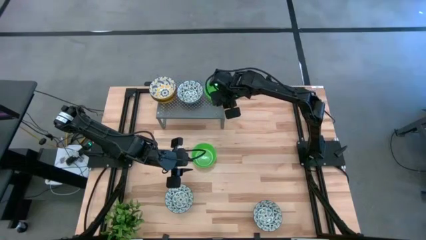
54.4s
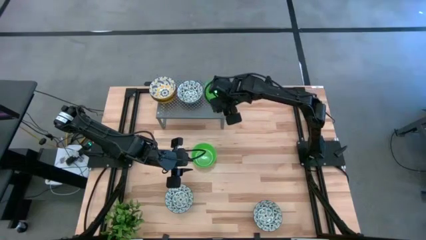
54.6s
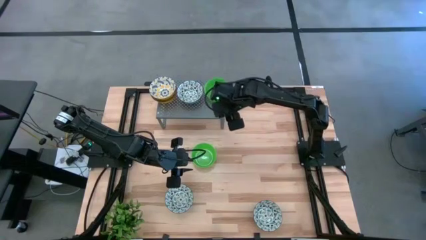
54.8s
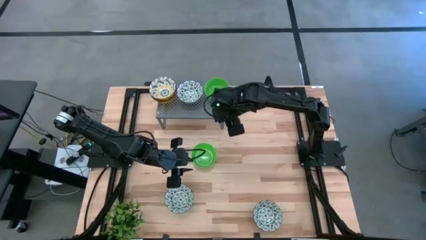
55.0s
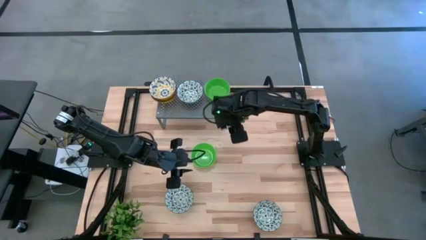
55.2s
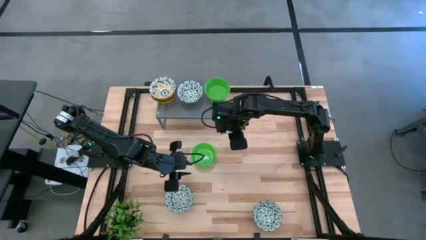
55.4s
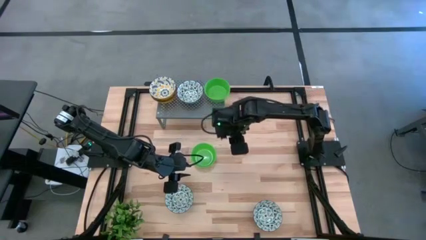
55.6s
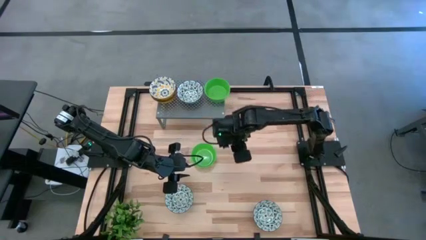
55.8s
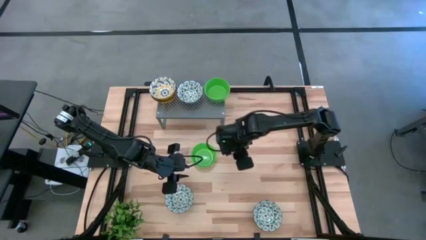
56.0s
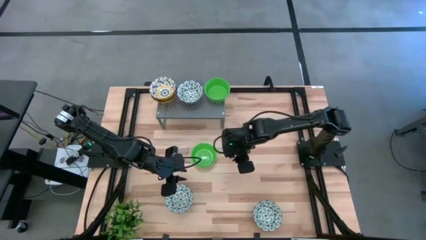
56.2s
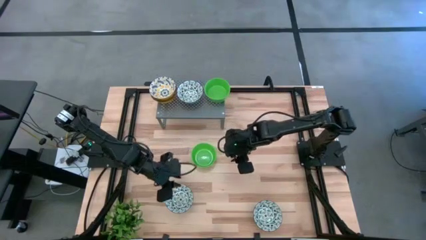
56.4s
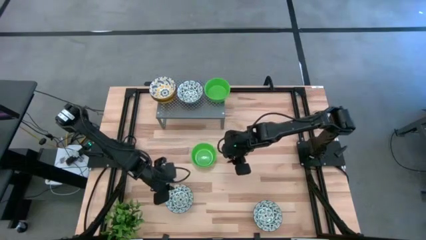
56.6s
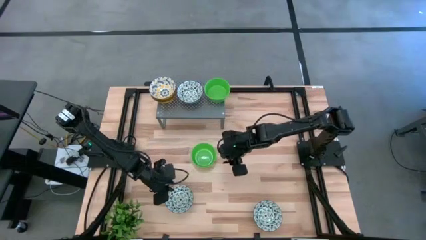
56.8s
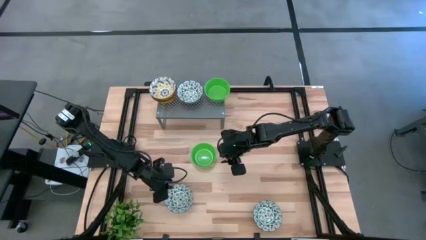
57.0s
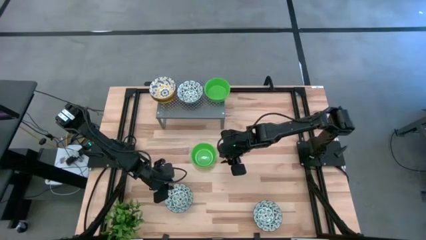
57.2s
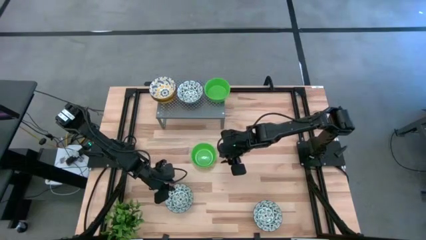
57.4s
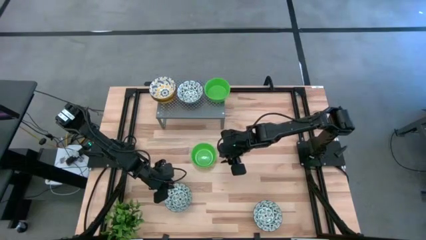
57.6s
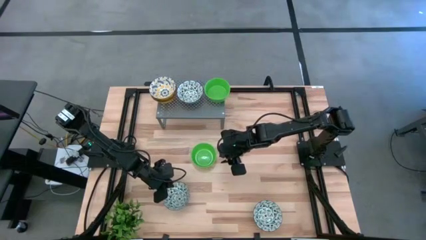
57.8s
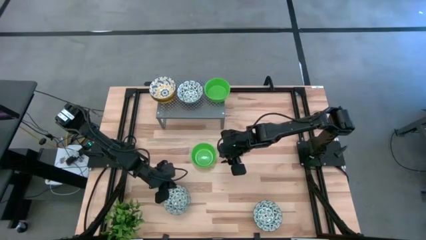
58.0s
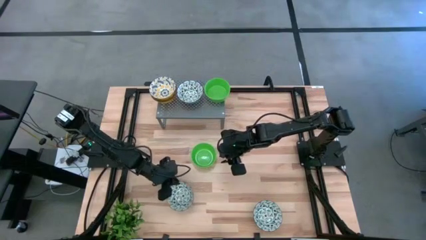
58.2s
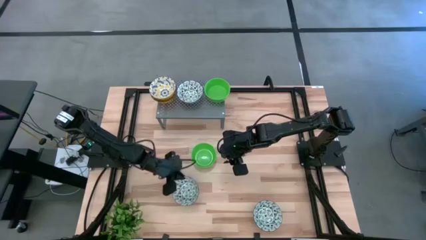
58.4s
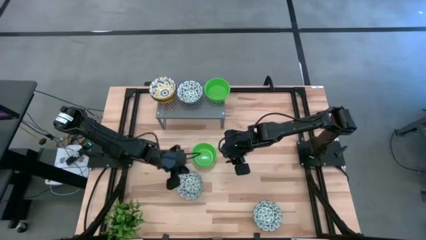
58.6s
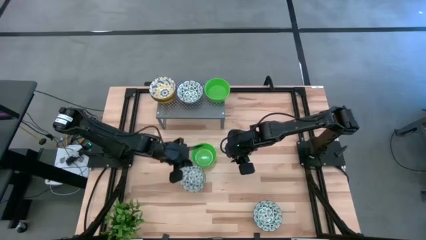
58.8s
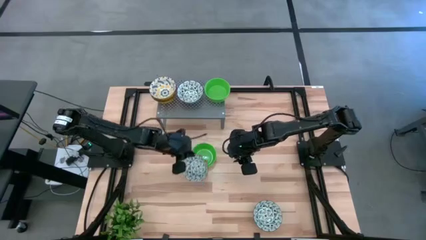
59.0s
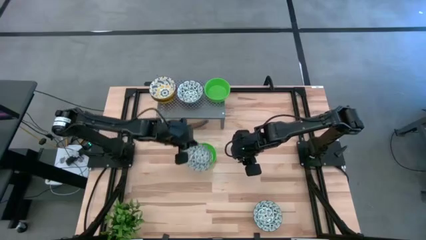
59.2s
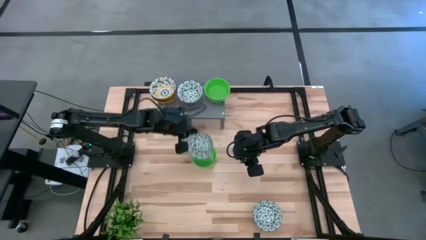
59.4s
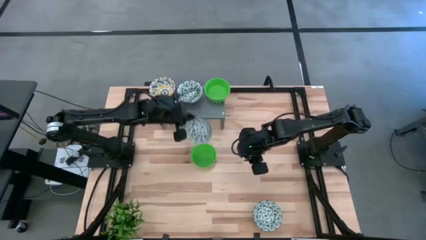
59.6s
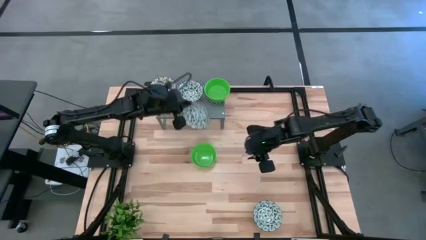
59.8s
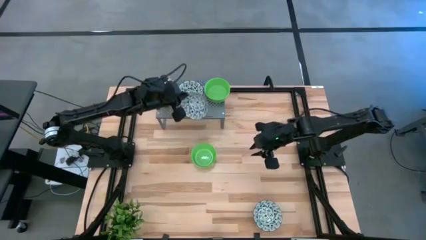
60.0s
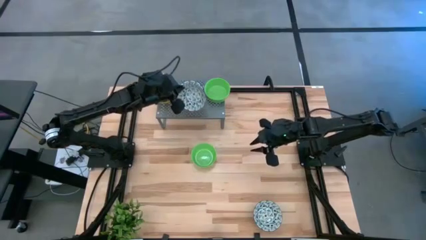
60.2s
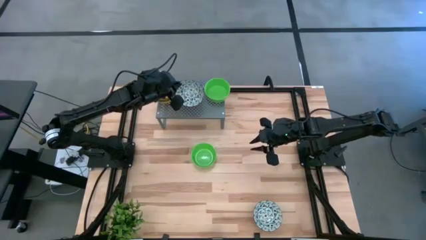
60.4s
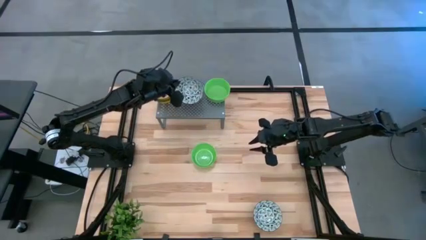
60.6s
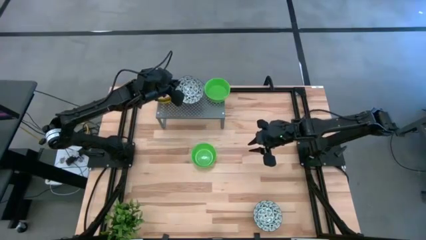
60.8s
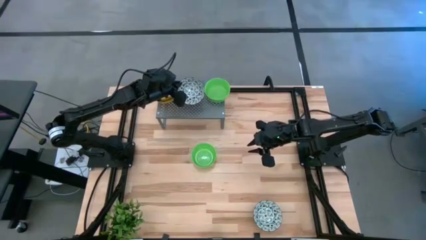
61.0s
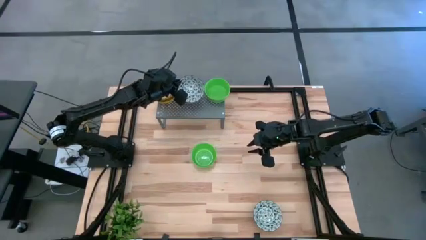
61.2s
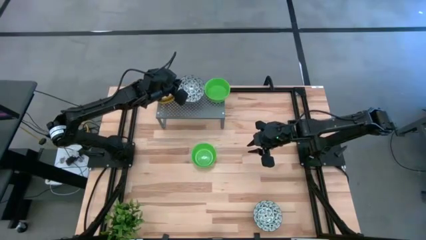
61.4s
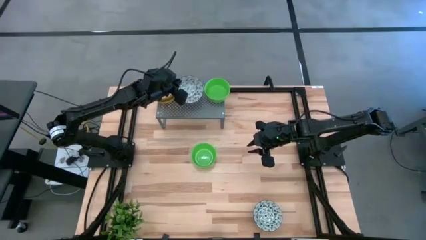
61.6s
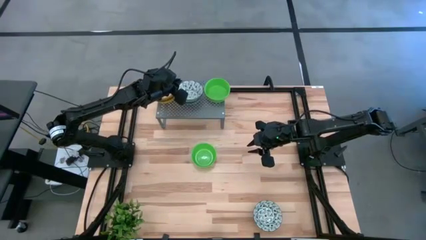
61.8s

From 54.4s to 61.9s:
Task: Pick & Place Mini bowls
Stack the left green patterned bowl on the green patterned bowl on the shelf

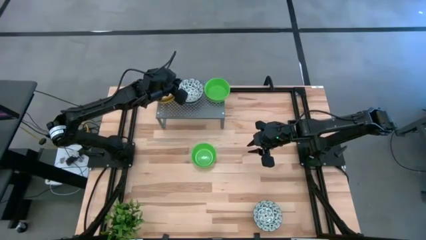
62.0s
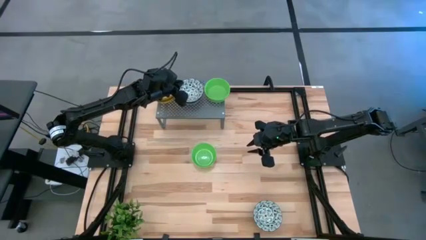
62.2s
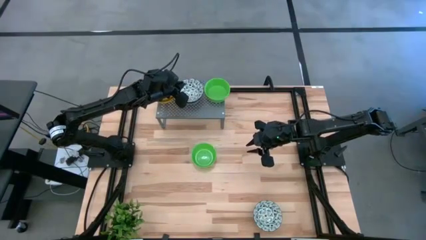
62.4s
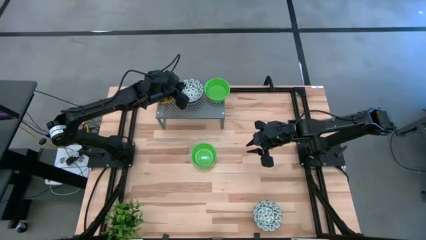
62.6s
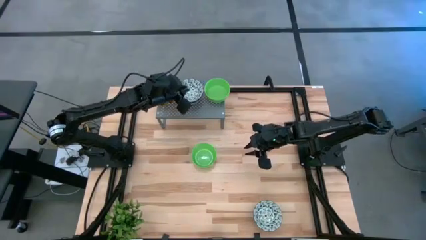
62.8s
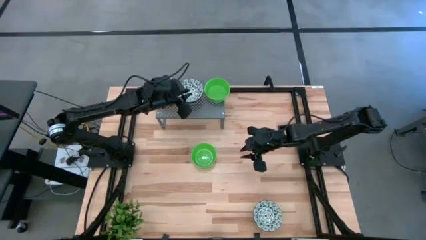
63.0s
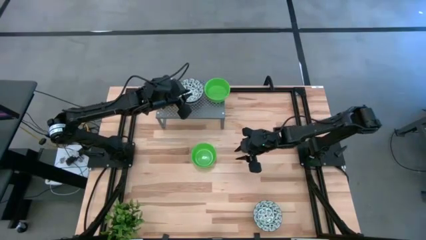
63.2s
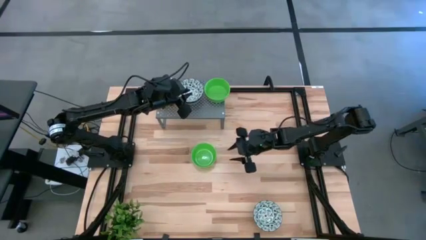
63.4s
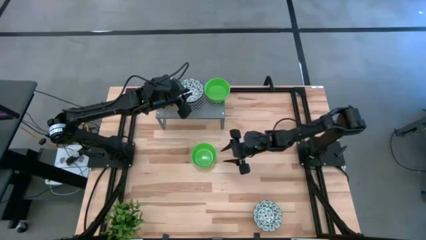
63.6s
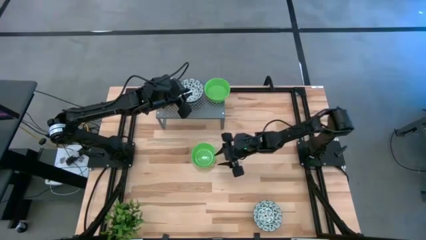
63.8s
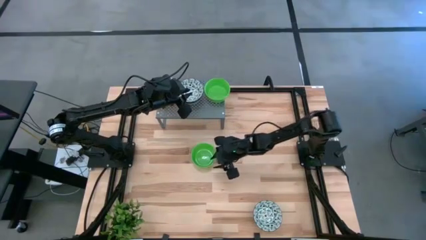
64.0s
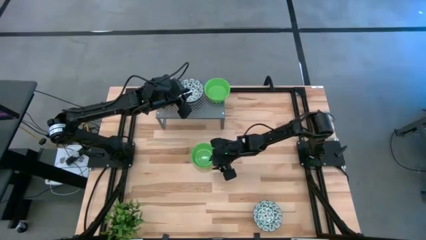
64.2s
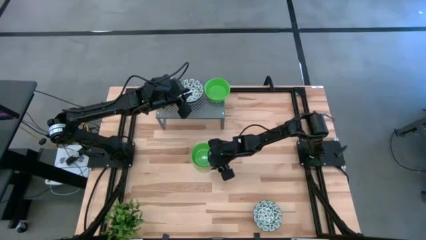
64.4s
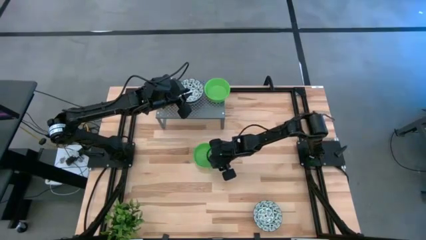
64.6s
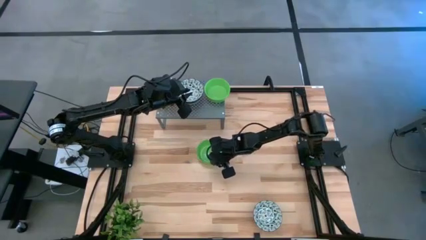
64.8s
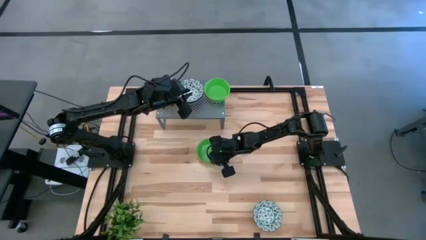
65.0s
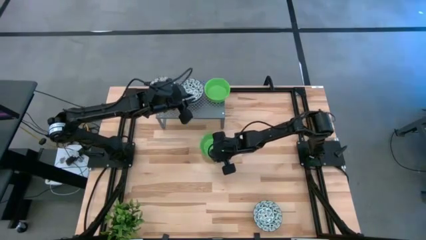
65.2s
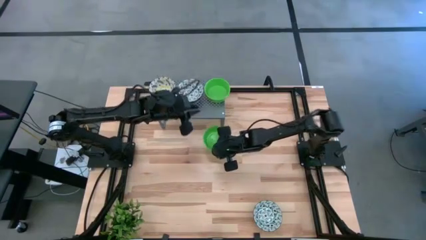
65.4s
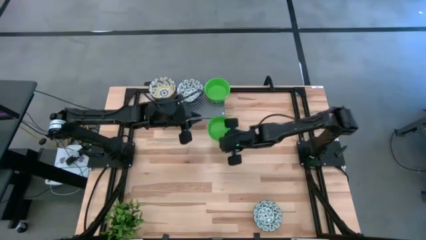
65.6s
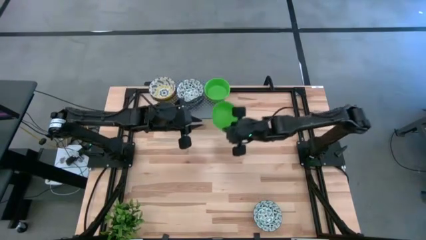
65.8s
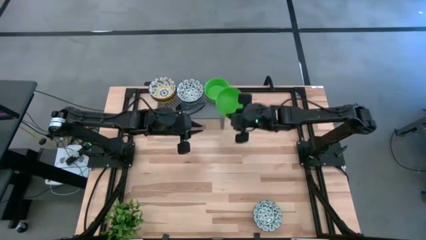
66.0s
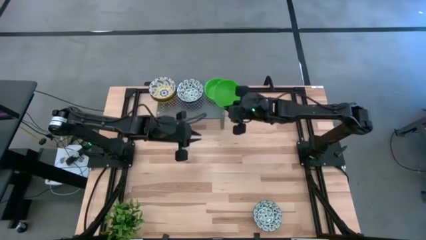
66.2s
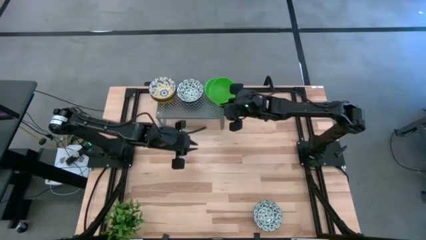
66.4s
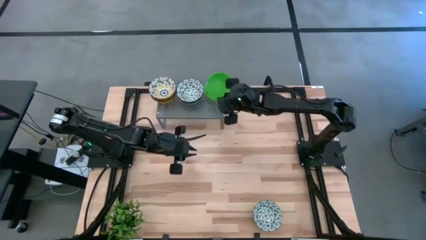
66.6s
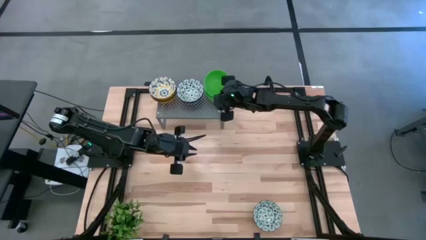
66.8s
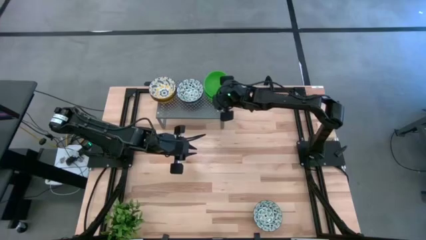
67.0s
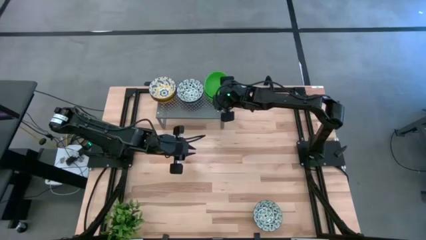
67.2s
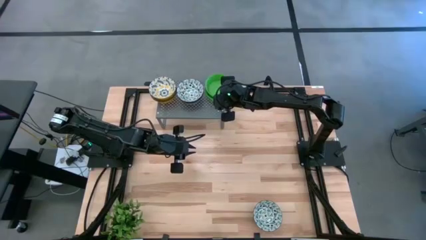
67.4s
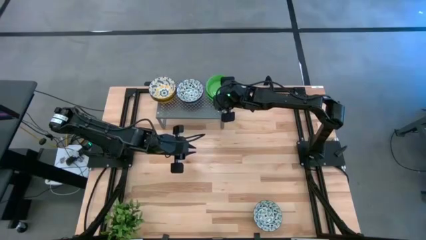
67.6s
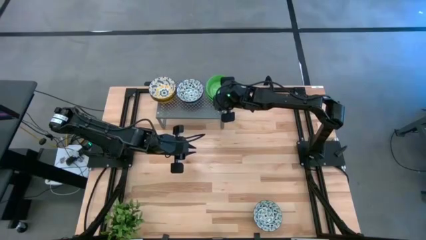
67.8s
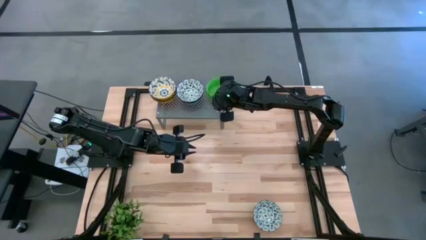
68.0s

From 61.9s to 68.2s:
Stack the green bowl on the green bowl on the shelf

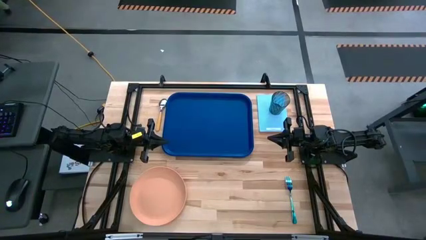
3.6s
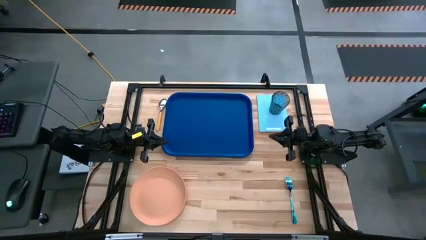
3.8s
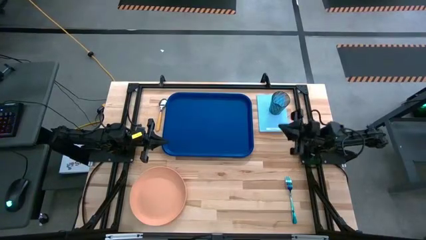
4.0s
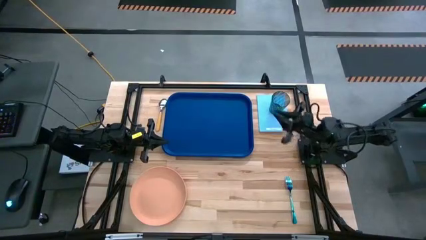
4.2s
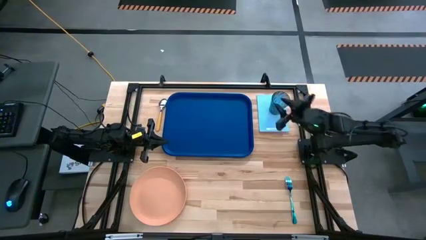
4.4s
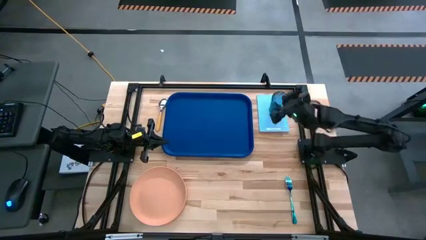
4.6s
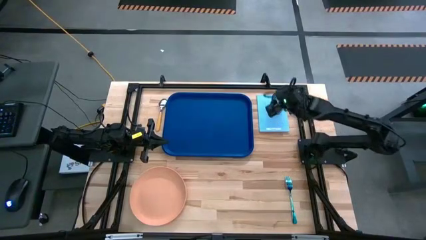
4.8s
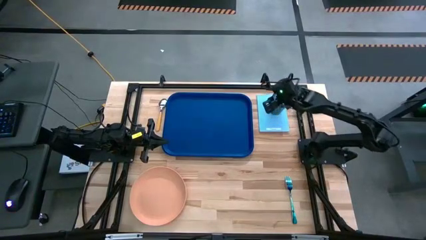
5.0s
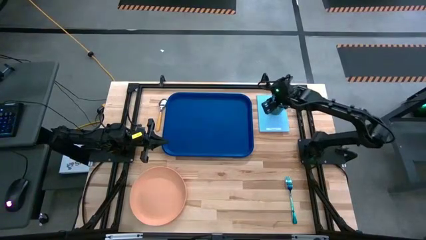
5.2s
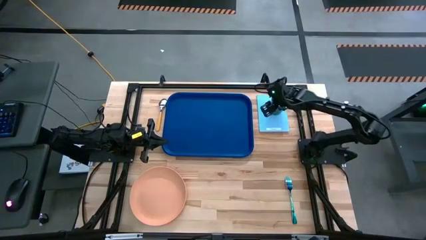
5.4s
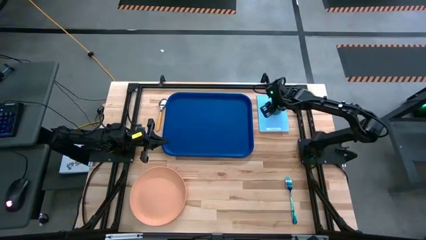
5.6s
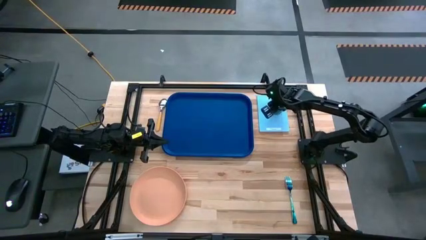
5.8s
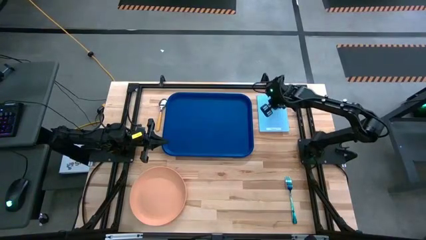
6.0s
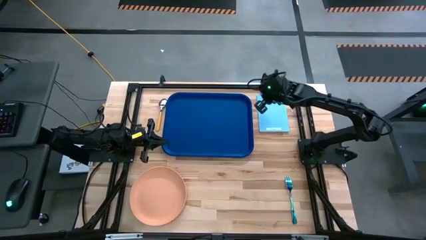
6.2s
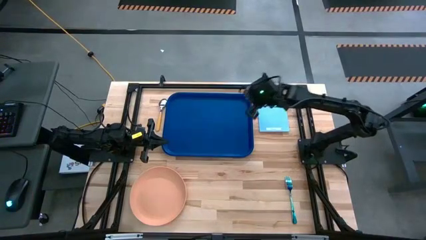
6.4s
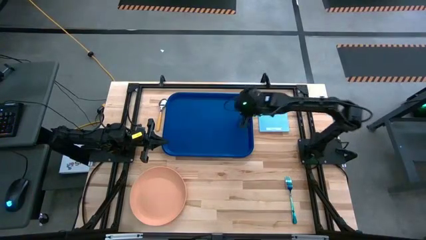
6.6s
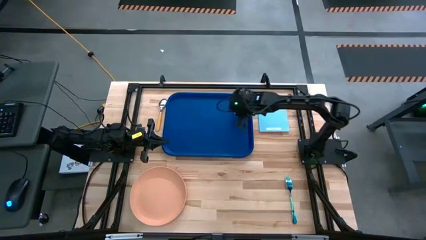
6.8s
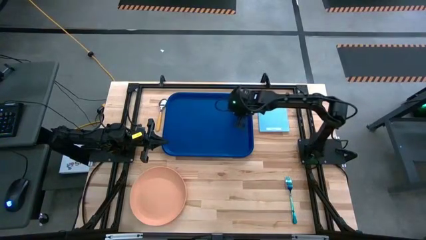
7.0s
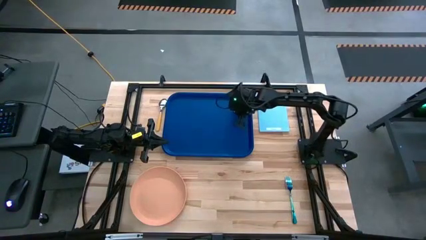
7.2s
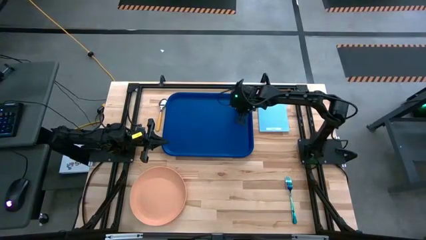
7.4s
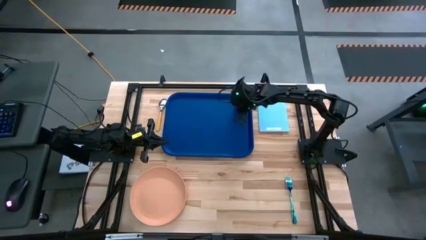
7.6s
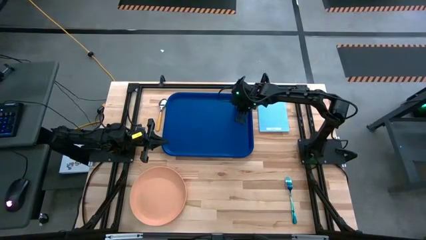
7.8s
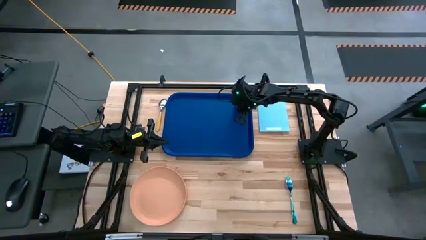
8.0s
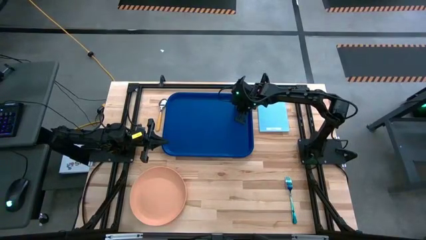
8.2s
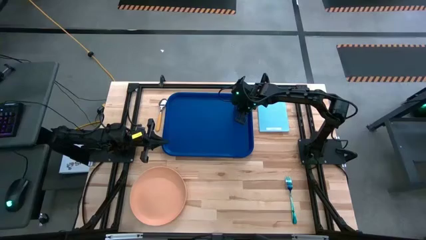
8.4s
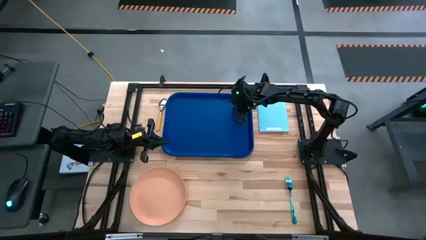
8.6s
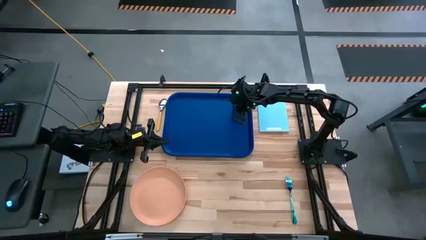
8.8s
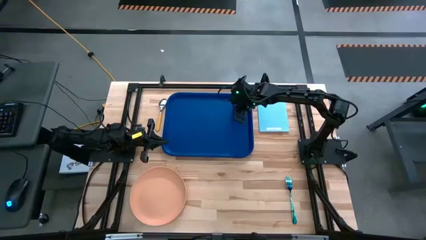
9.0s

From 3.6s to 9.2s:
Task: Pick and place plate/cup/fork/spoon on tray
Put the blue cup on the blue serving tray
